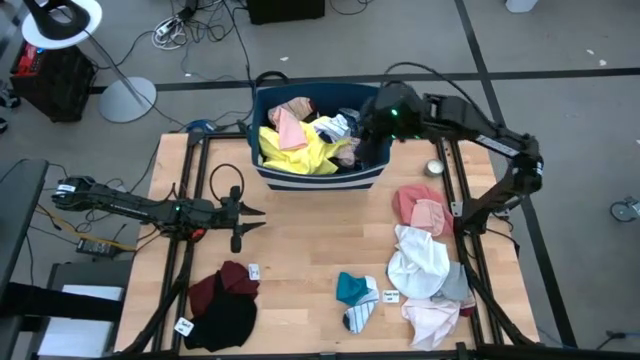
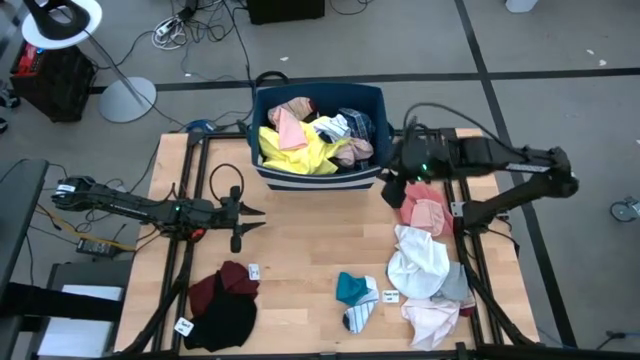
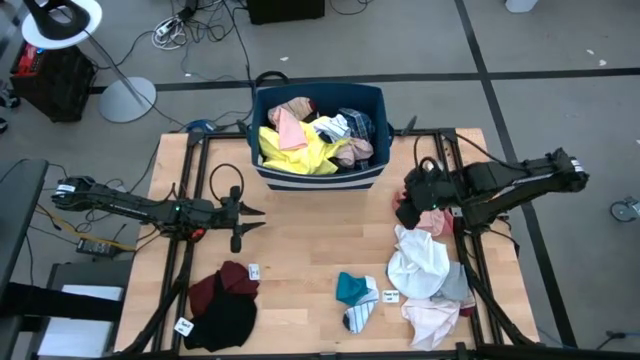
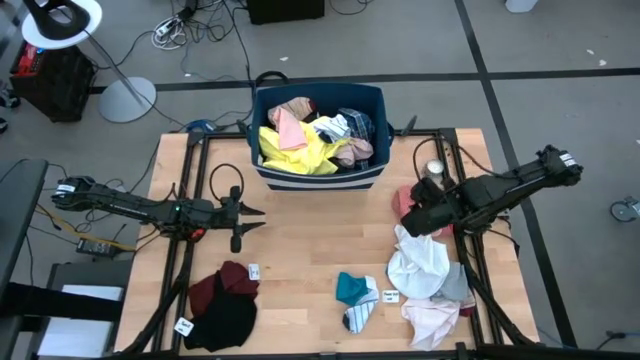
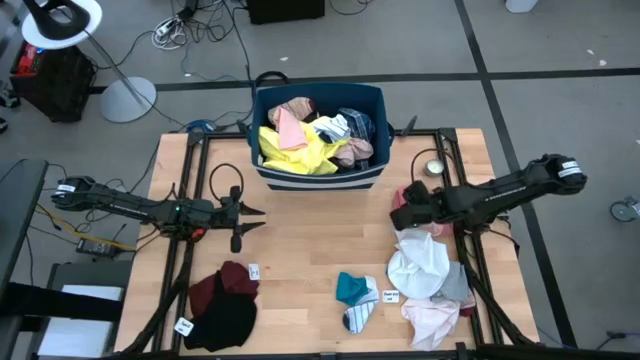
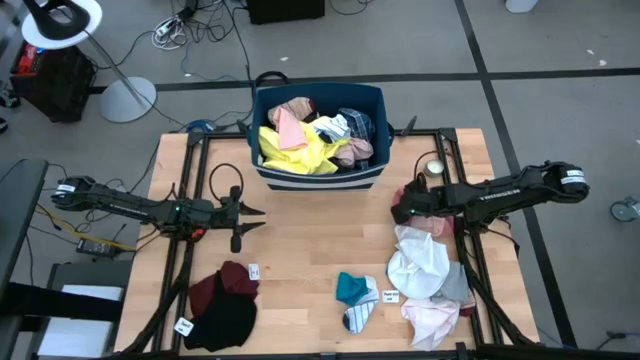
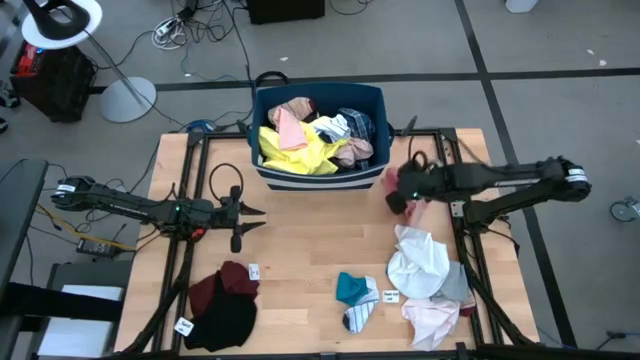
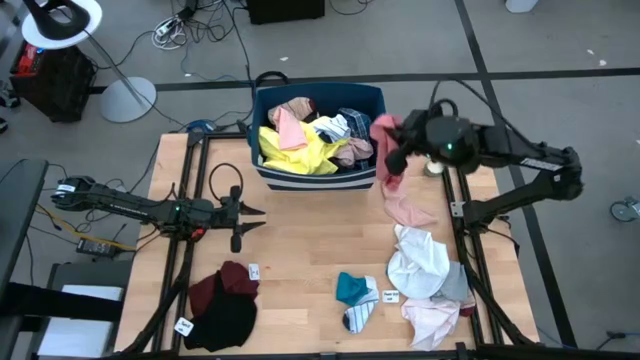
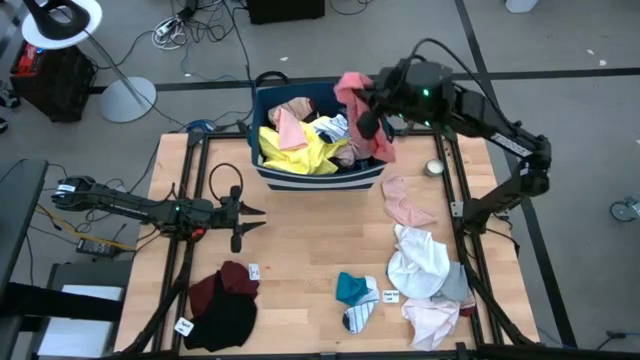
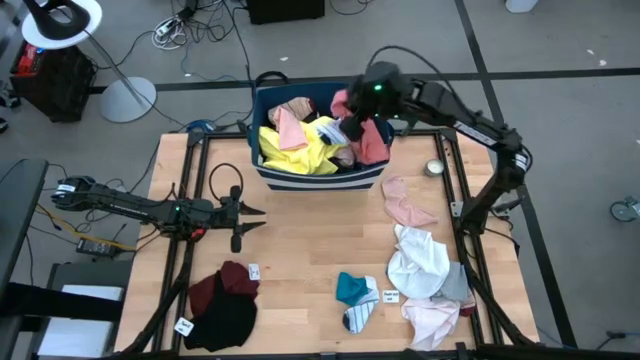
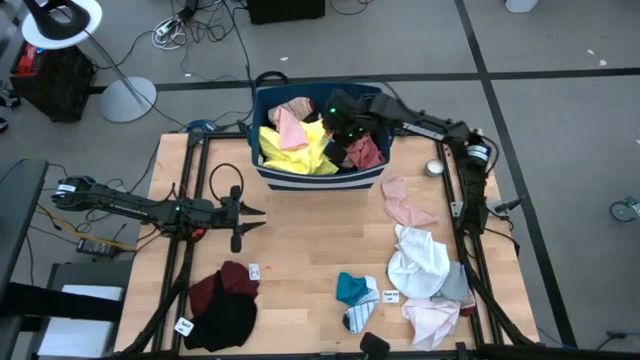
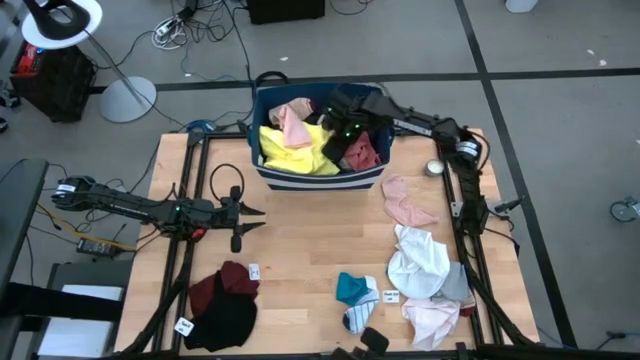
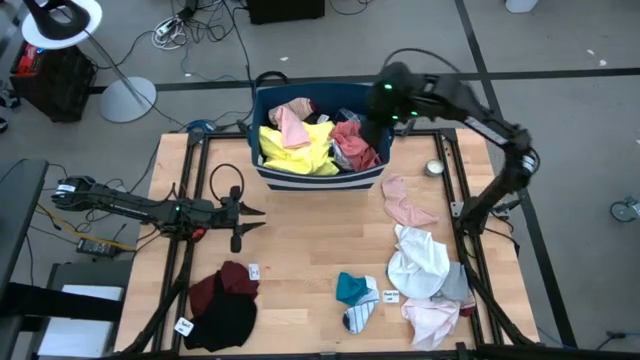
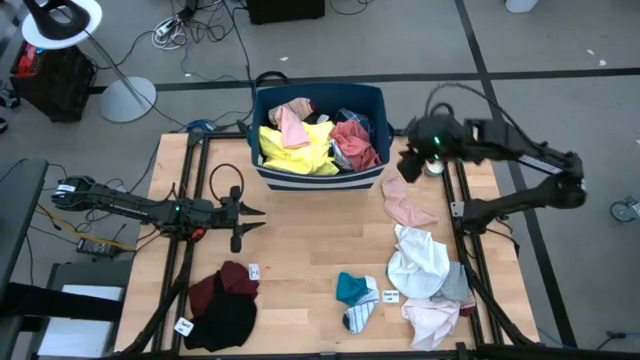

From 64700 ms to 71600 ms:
Task: Sort clothes
Put the pink shirt into the blue laundry bin

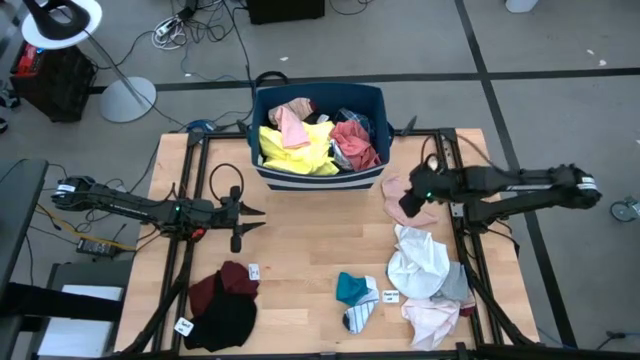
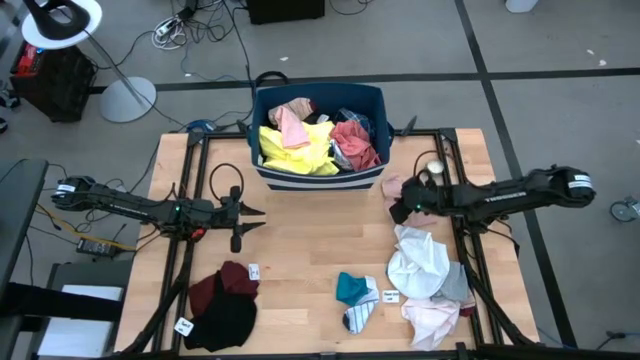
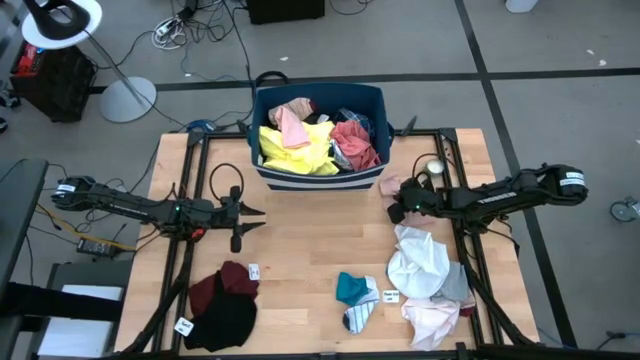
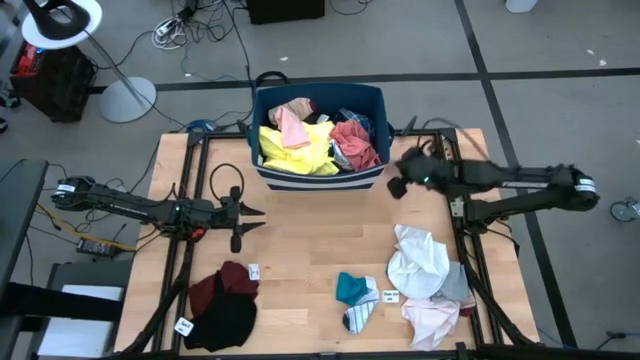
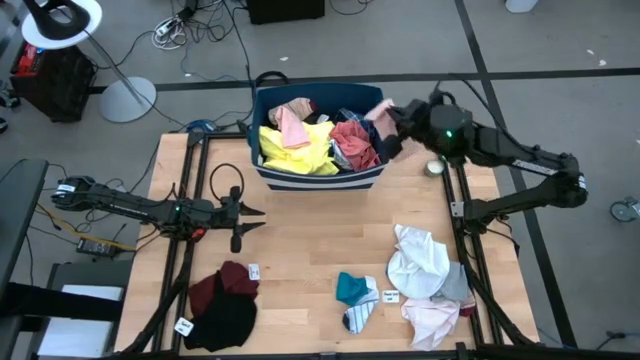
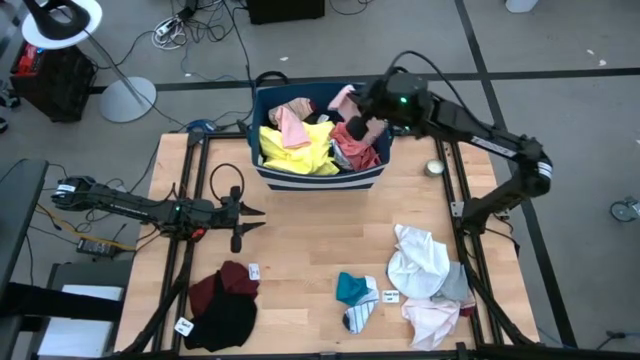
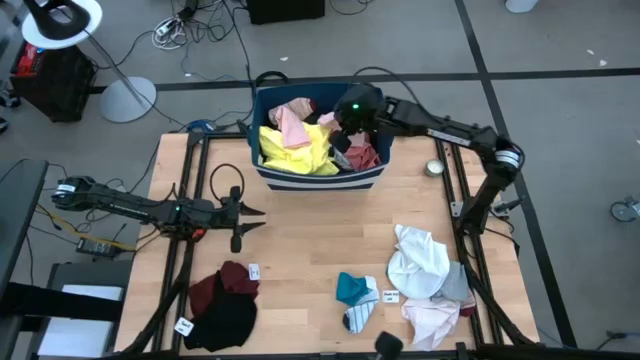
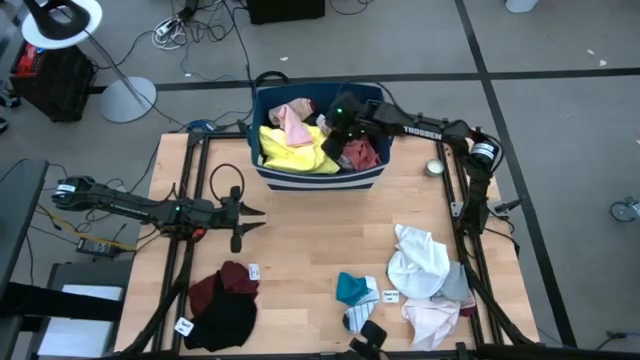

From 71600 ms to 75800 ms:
Put the light pink sock into the blue laundry bin

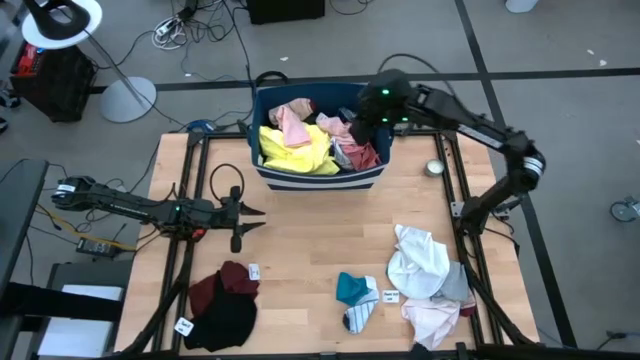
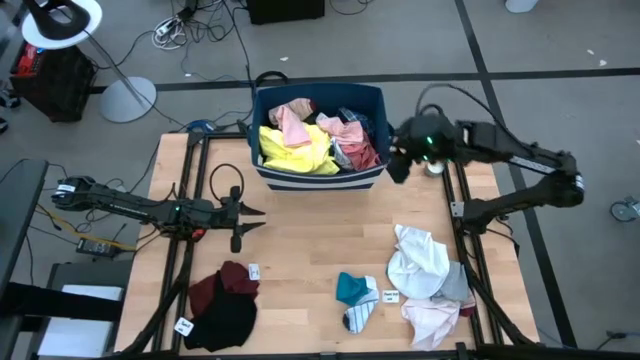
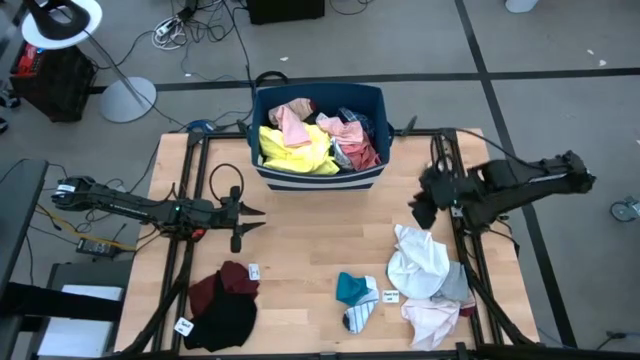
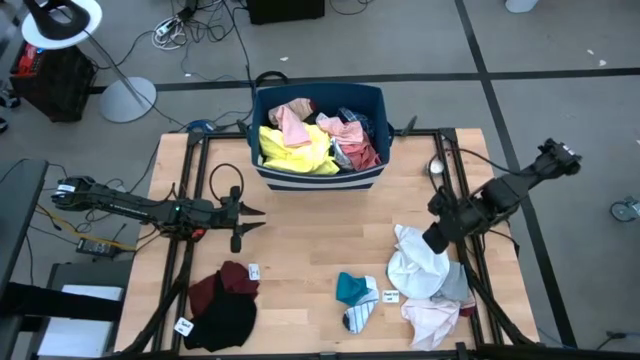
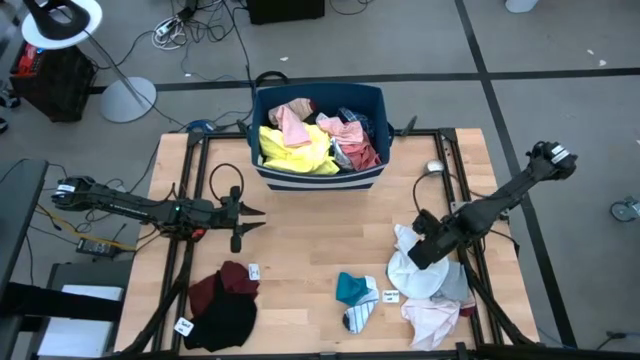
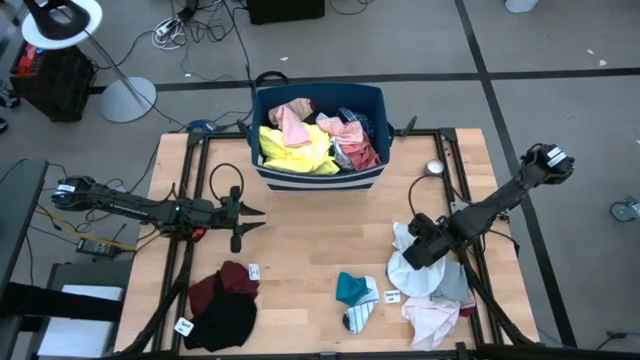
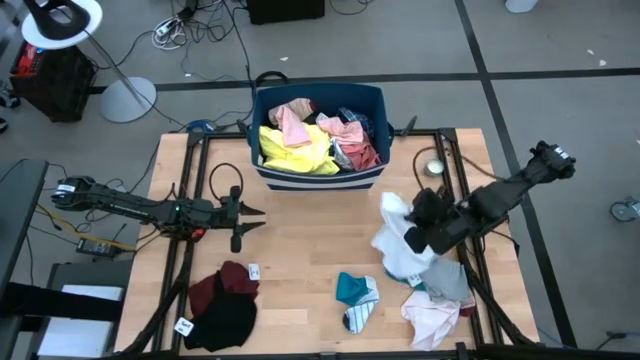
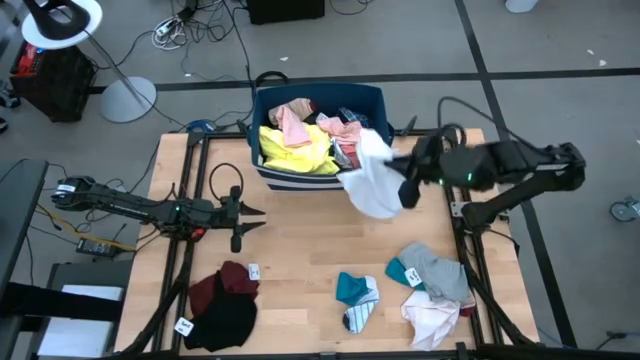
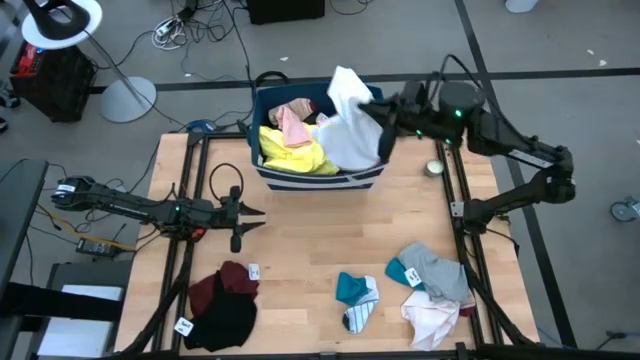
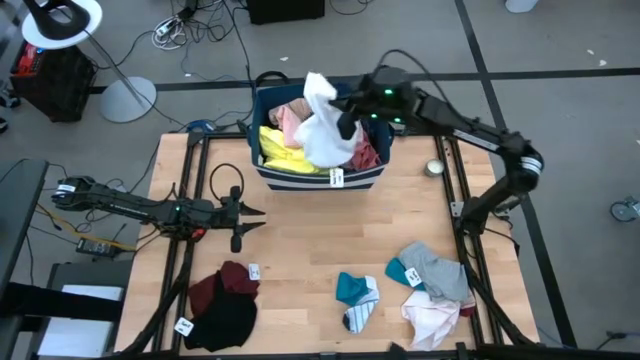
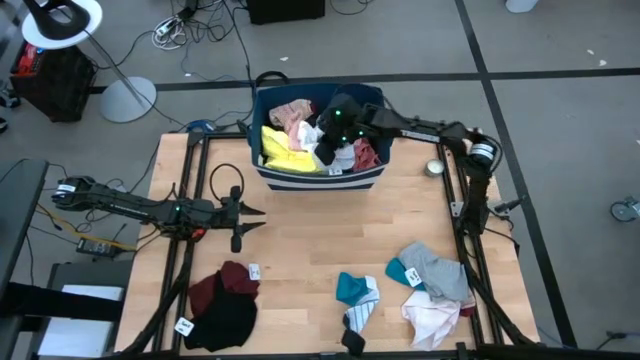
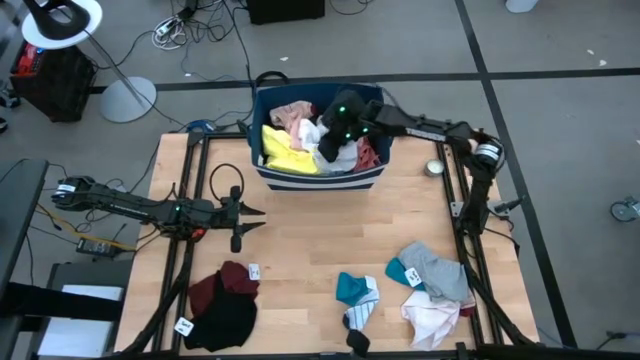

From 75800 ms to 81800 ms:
Put the white shirt into the blue laundry bin

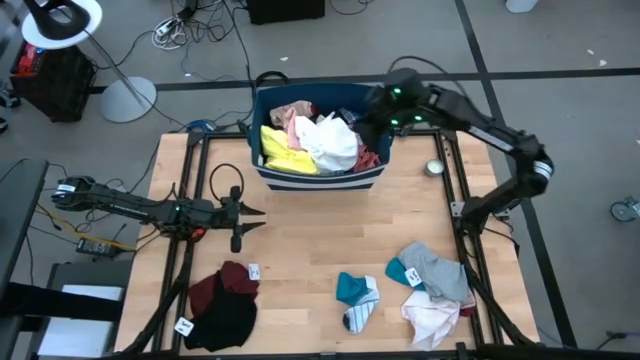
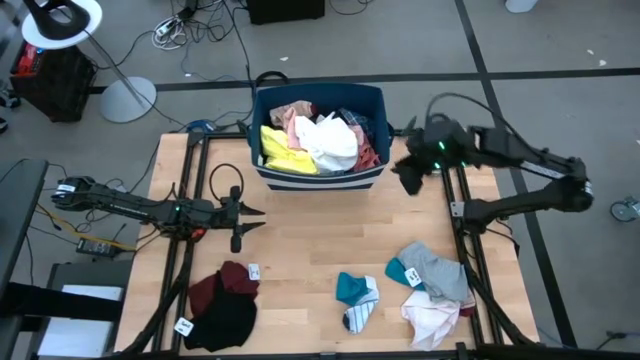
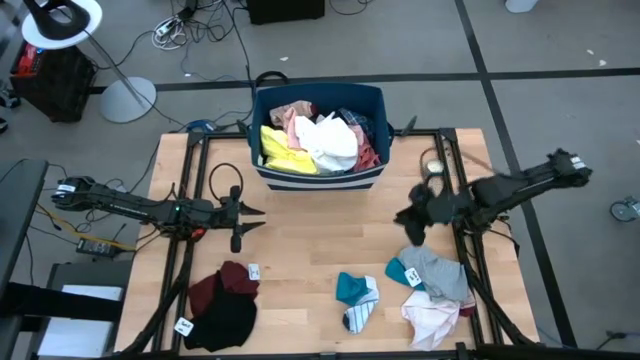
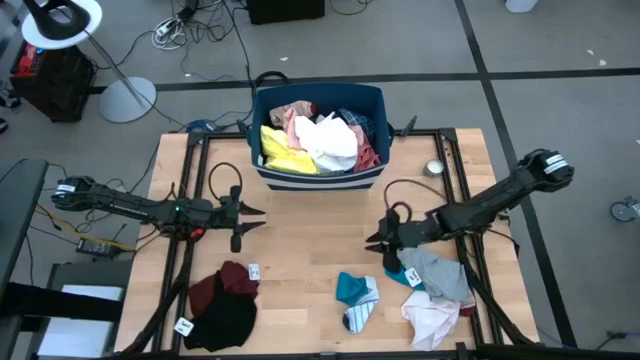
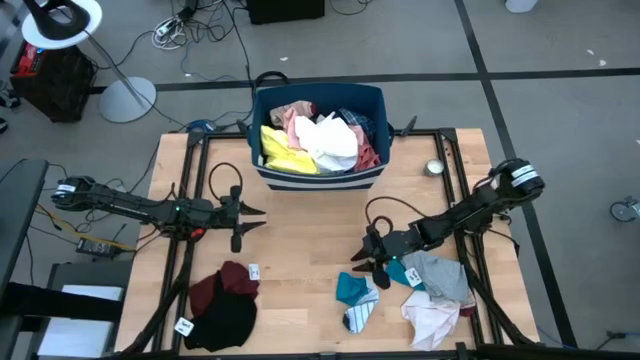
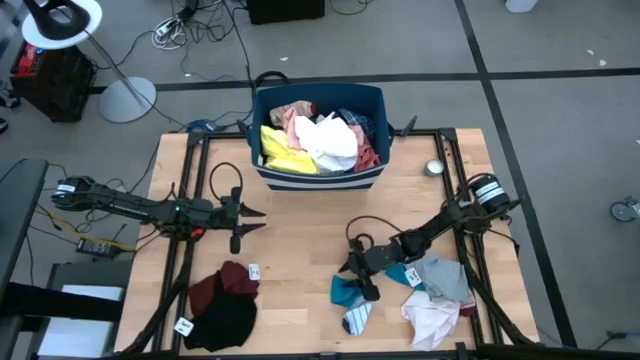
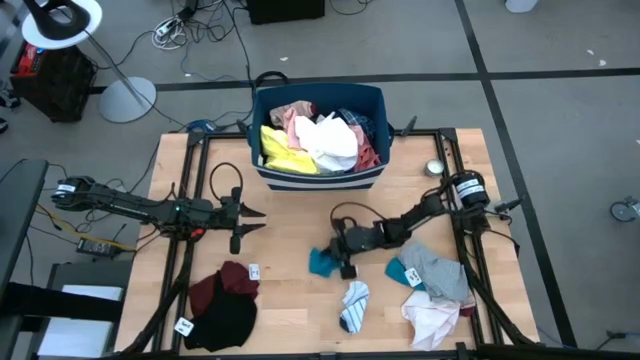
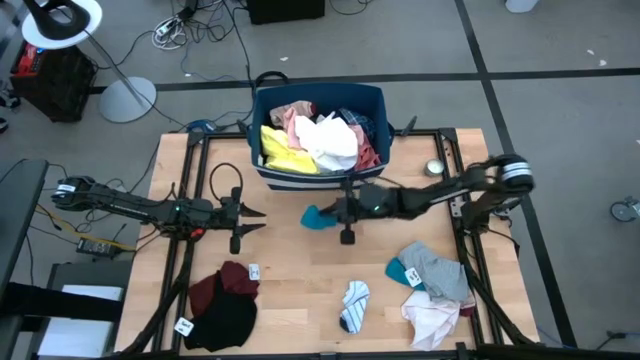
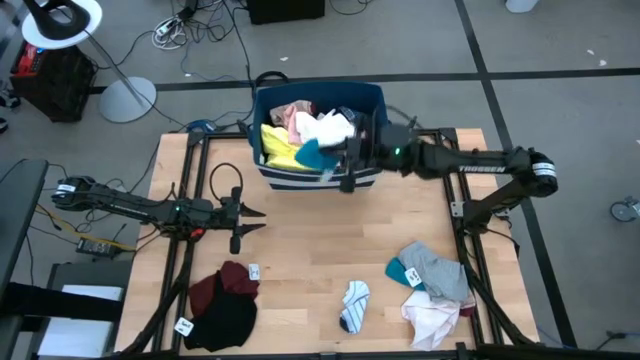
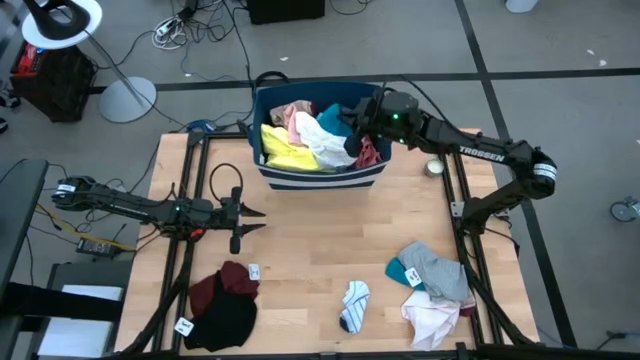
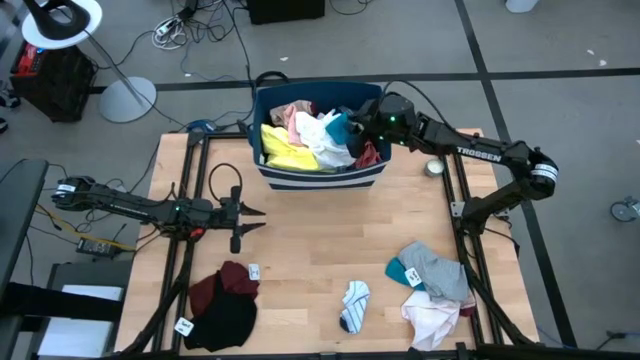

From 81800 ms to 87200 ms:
Put the blue sock into the blue laundry bin
